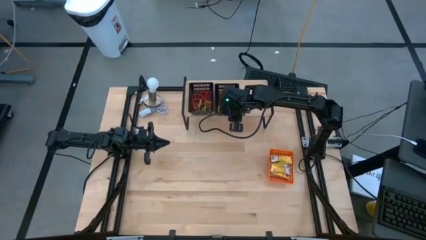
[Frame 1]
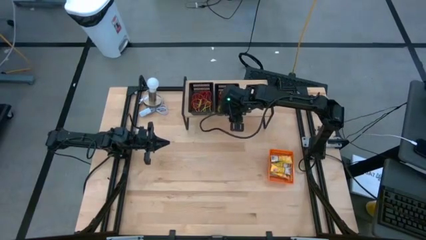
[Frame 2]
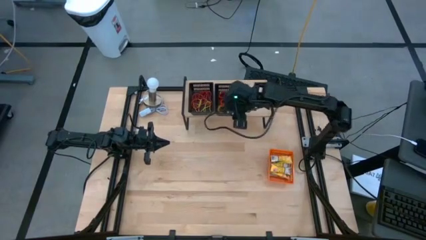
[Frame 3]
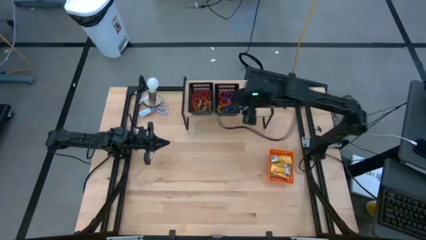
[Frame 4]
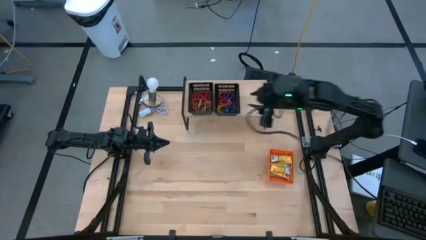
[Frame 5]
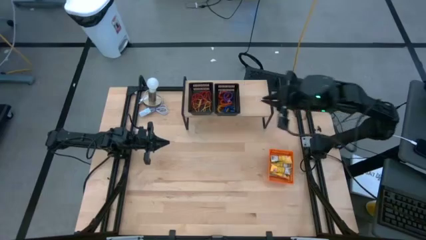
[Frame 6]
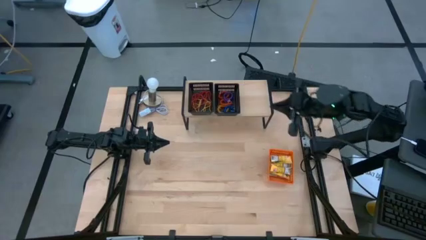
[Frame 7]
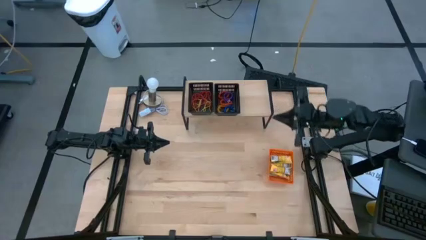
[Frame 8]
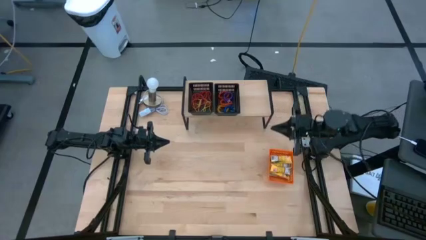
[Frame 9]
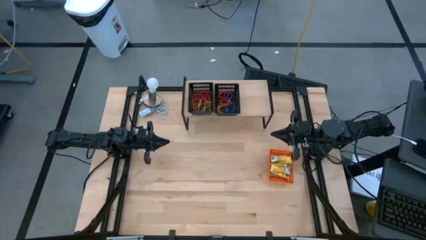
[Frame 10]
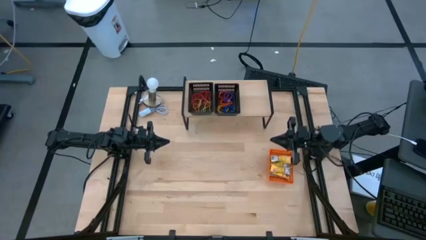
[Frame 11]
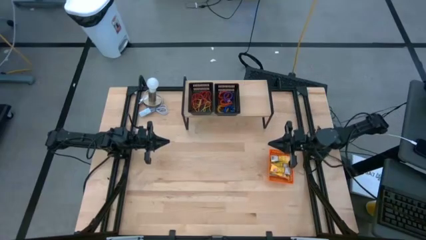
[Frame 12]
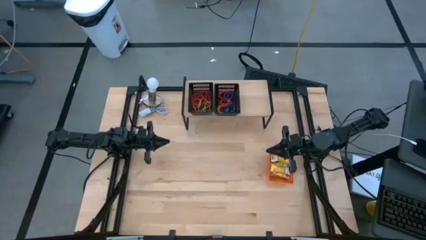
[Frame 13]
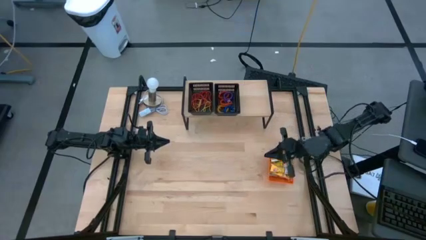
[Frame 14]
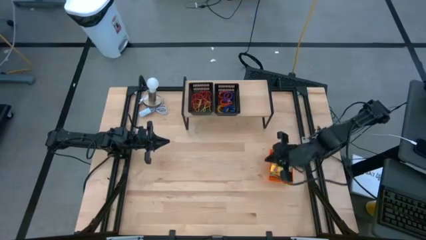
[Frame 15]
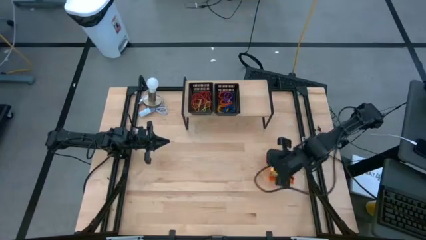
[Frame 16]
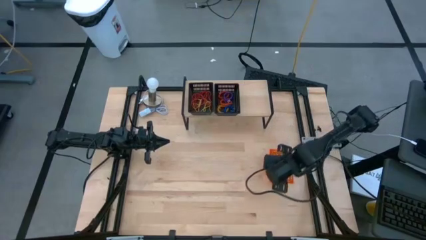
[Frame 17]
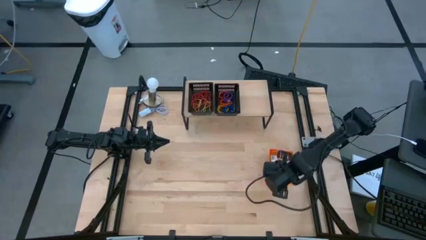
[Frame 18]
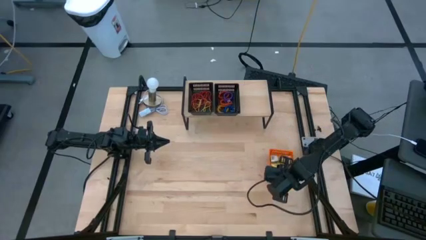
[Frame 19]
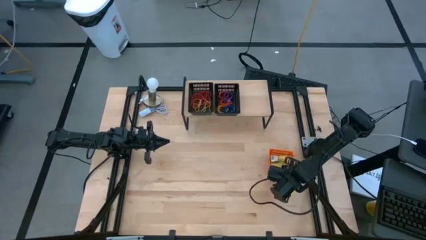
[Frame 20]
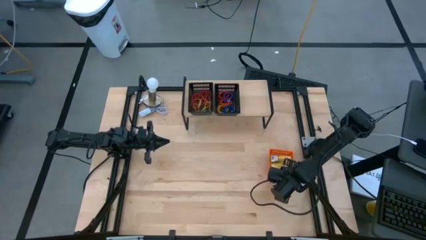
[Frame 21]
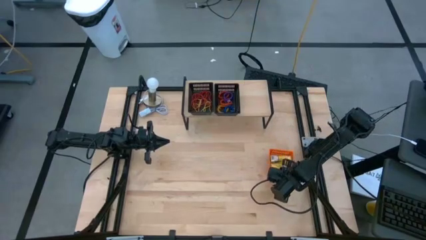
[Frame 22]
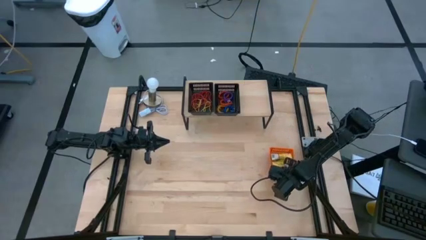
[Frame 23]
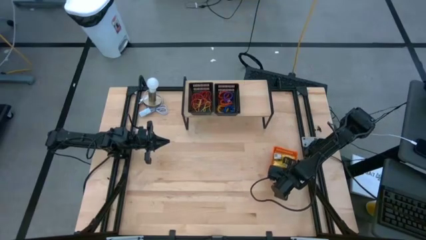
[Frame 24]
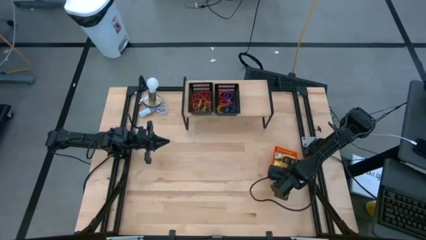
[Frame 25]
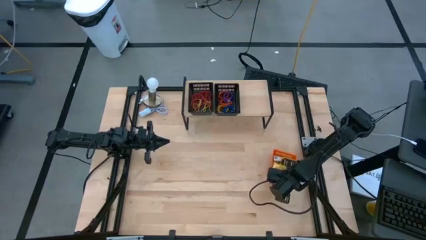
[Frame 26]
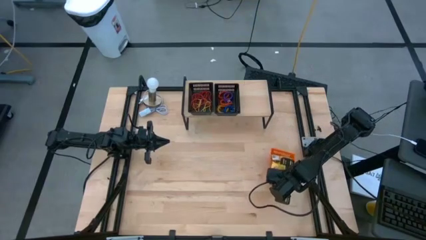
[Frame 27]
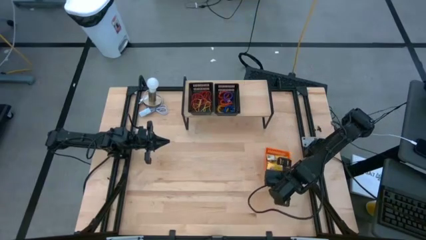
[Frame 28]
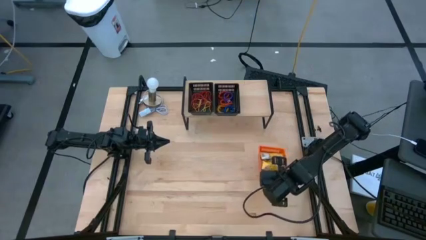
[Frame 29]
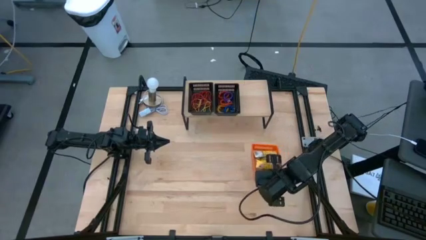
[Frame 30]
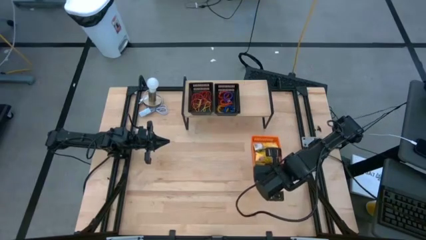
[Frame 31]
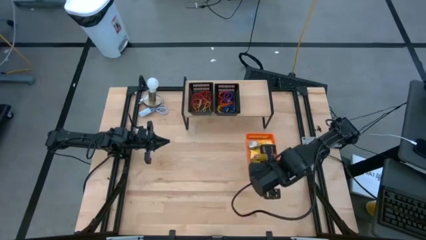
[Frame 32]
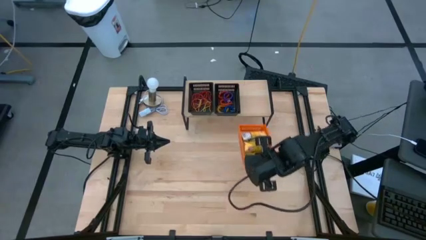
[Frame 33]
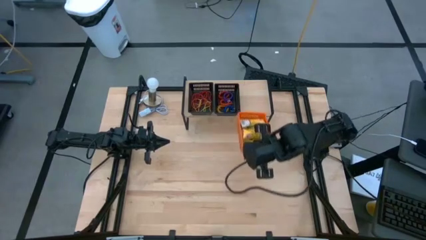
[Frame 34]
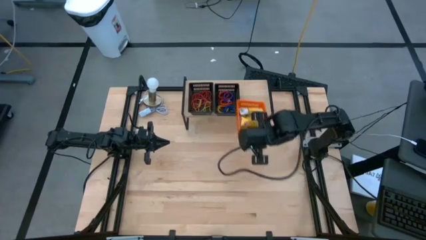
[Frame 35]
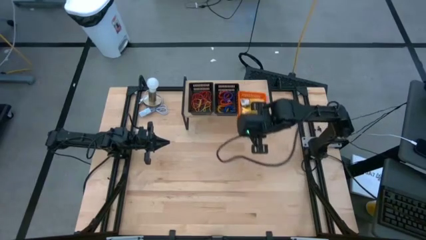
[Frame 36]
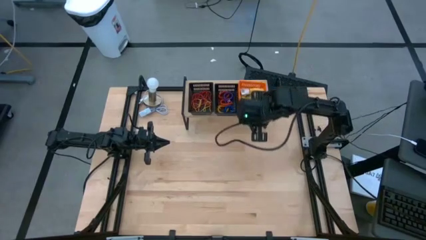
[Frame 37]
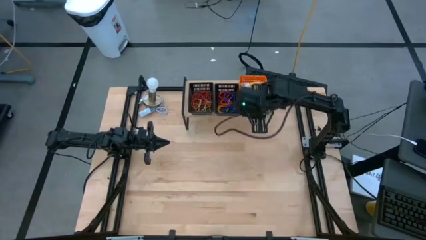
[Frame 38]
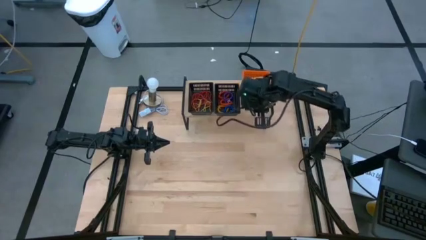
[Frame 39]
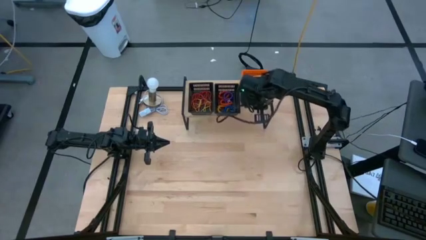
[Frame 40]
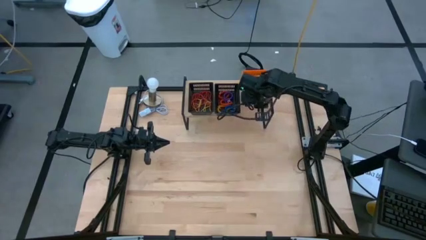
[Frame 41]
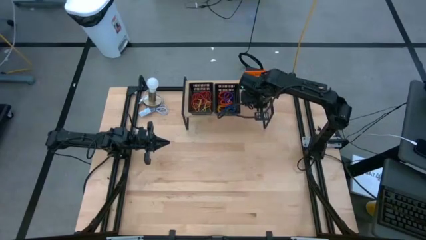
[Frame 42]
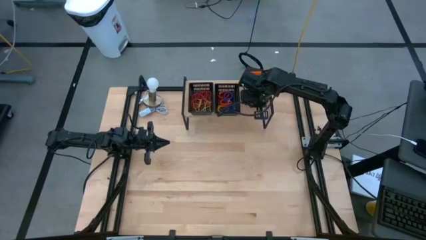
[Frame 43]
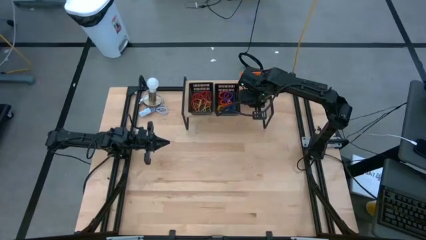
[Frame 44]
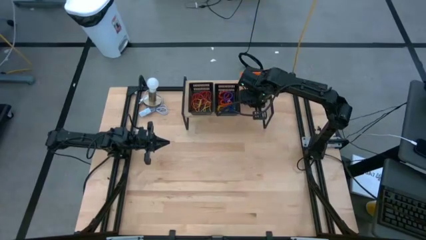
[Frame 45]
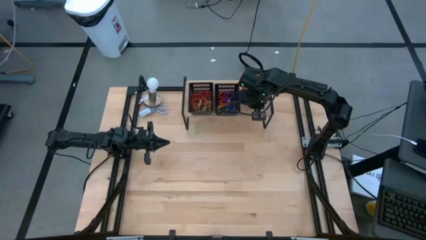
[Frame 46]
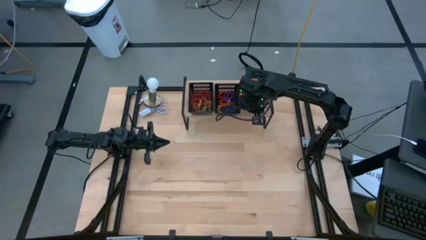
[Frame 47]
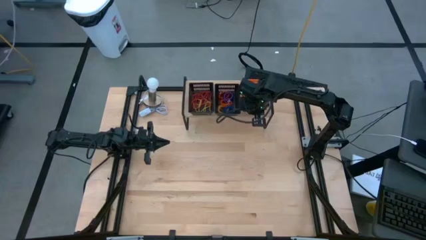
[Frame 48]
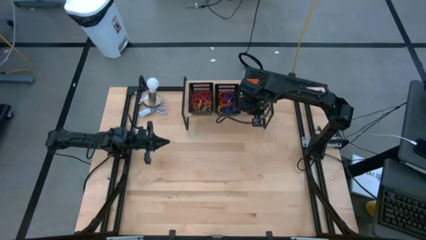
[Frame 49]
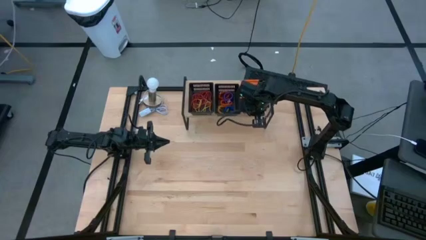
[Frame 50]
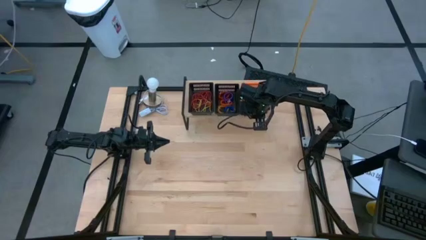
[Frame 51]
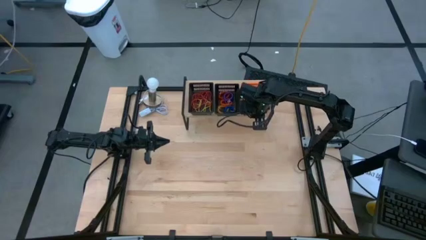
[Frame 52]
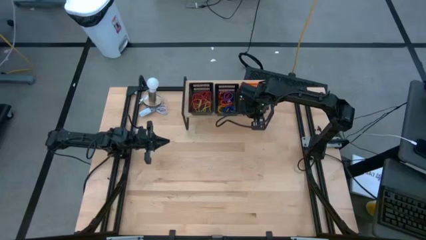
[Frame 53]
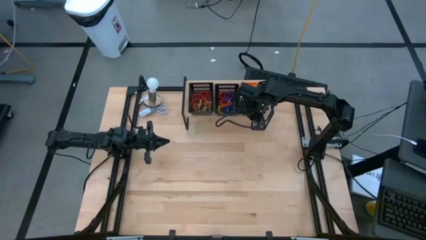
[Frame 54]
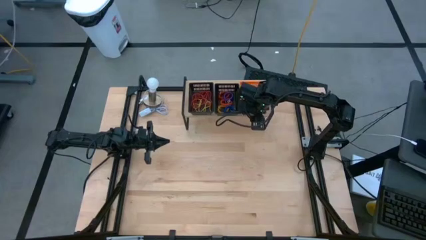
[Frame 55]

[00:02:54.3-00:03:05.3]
Task: Pick & Place Office Desk Supplies
Put the orange bin on the shelf

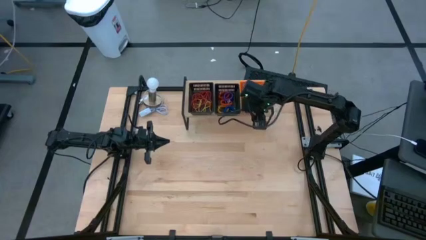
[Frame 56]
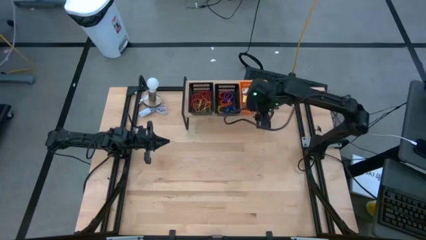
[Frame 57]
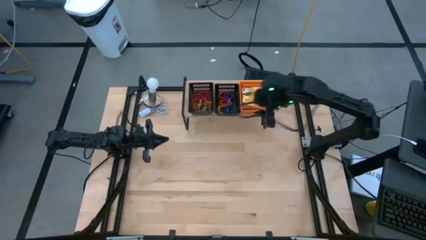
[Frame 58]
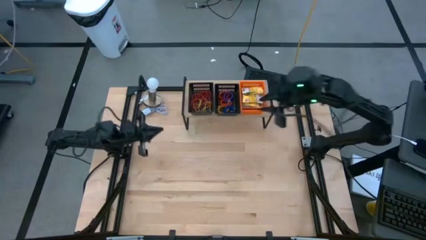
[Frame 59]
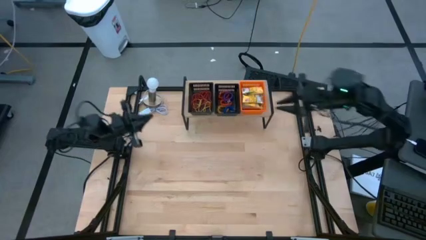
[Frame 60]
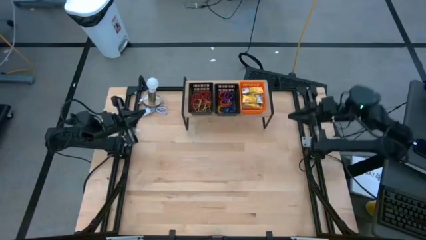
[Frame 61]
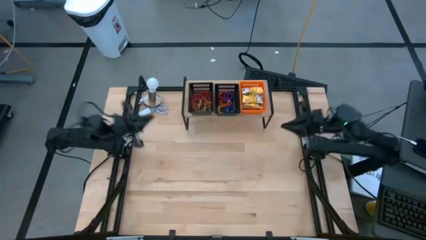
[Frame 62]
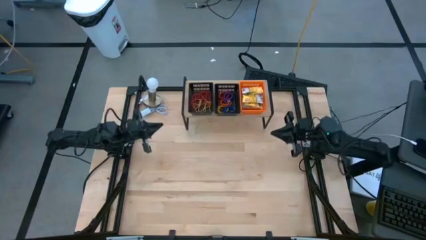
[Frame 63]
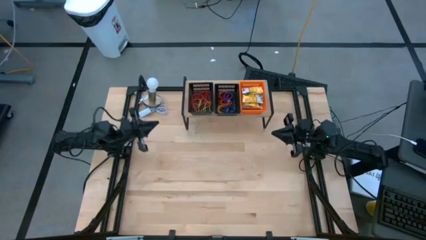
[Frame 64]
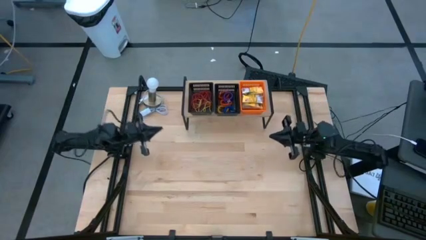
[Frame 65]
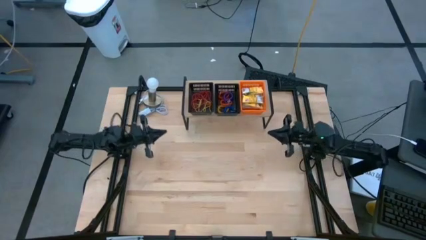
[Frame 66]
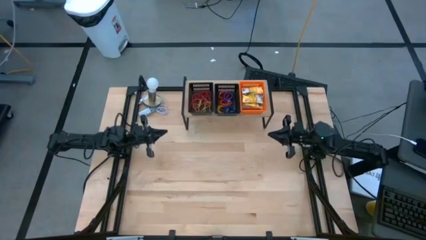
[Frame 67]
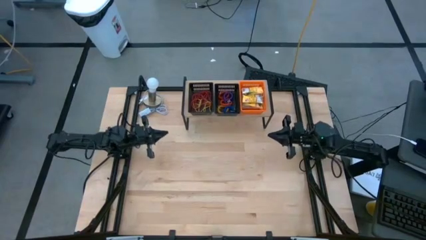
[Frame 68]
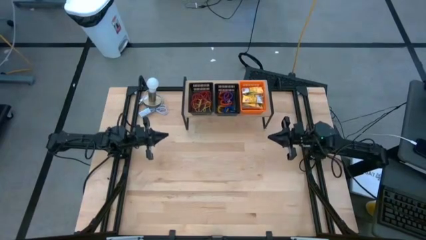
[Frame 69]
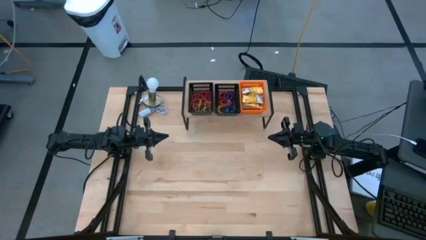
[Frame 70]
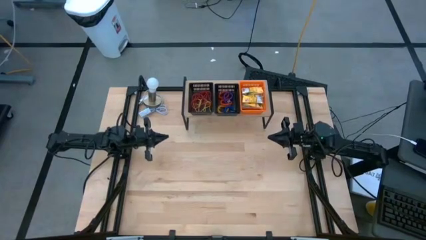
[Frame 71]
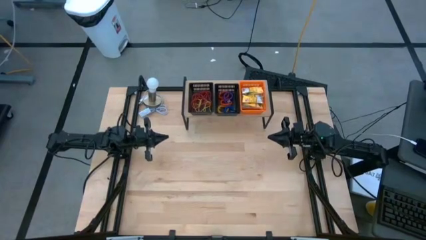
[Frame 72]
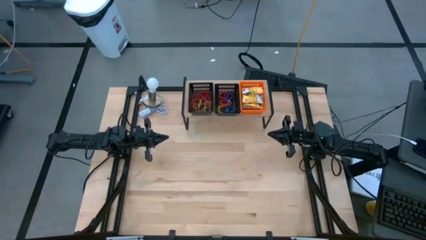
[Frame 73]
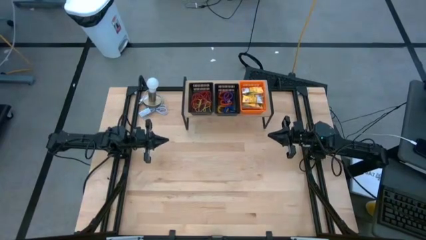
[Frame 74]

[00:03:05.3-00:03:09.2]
Return to Home Position

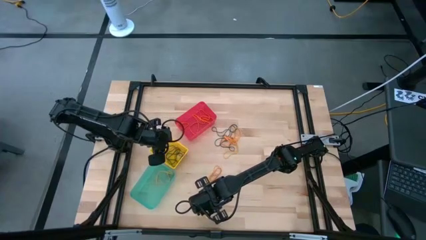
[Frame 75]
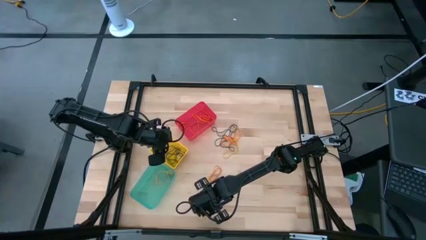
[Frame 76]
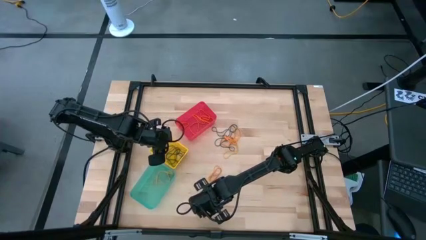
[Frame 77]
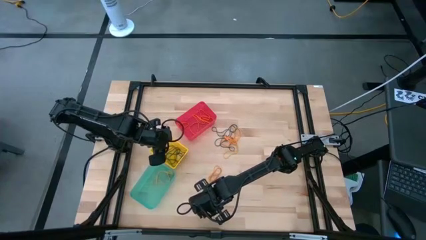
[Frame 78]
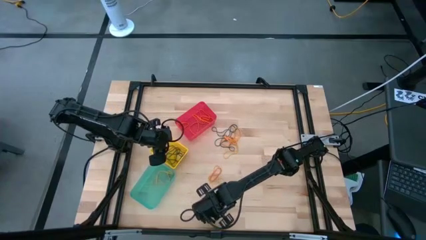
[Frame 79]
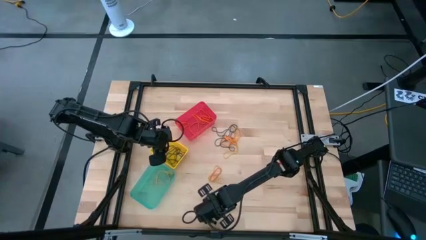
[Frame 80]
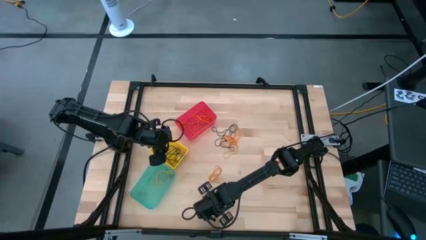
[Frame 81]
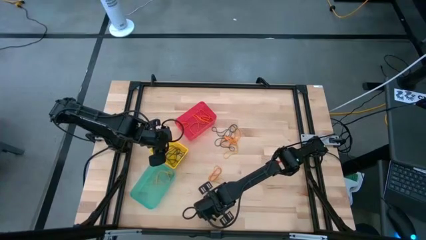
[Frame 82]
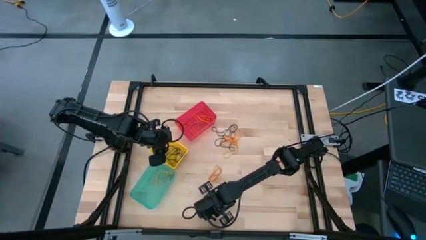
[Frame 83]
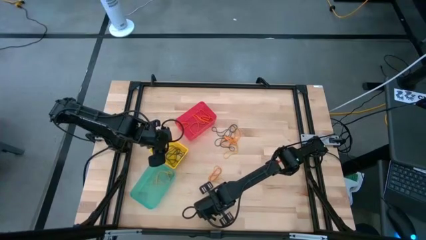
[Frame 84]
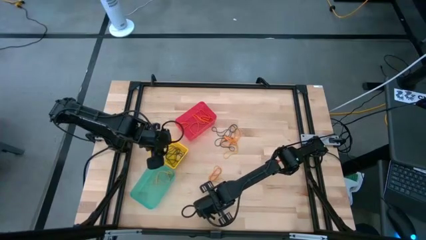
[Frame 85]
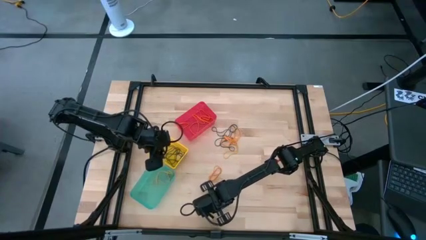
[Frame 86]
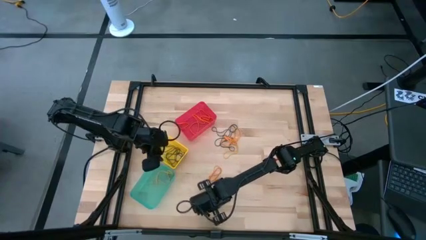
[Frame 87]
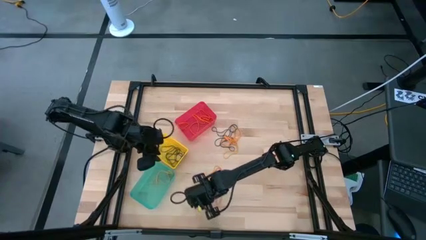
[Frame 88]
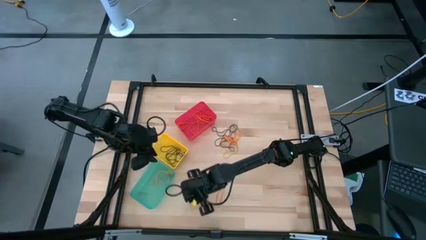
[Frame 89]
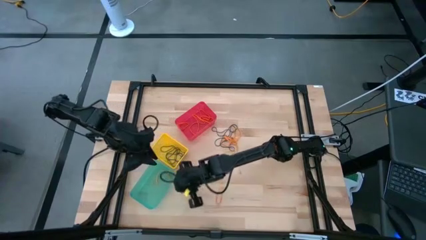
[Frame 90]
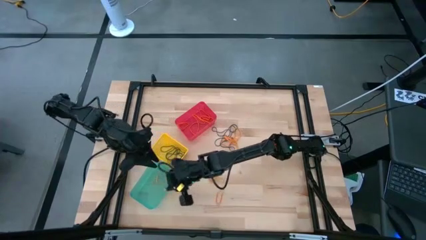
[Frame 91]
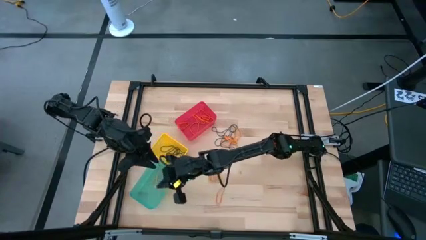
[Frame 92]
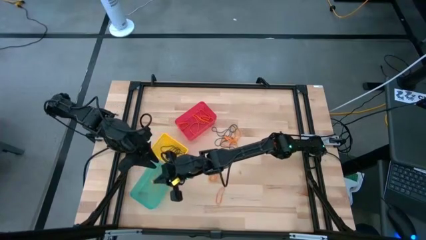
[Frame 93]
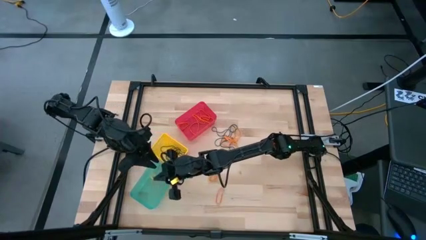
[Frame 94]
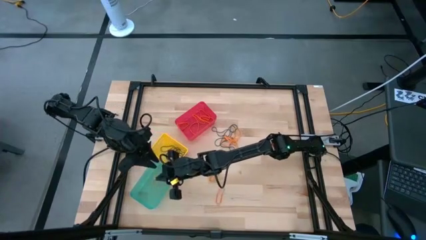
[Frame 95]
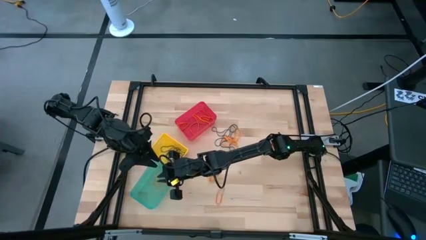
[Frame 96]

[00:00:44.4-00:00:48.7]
Task: Sort rubber bands into baskets
Put the yellow rubber band into the light blue bin
